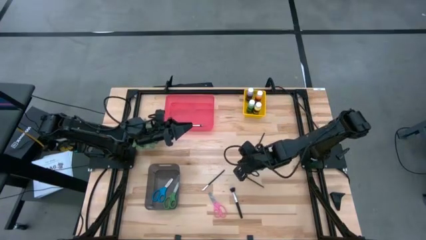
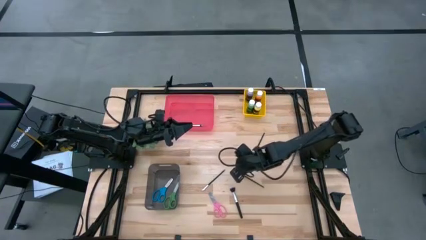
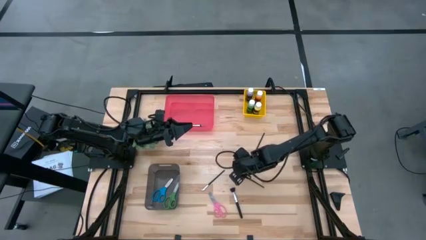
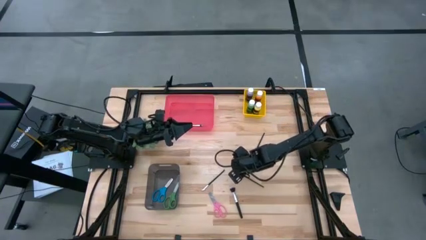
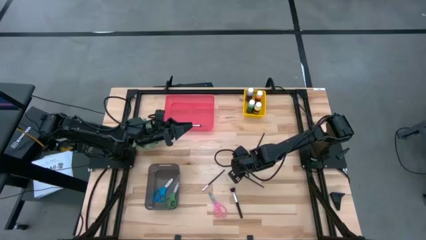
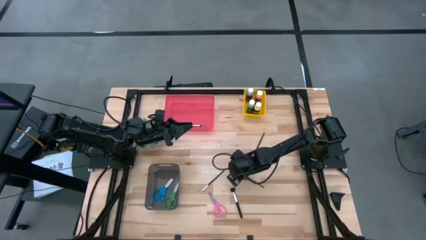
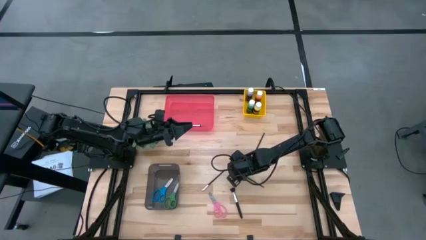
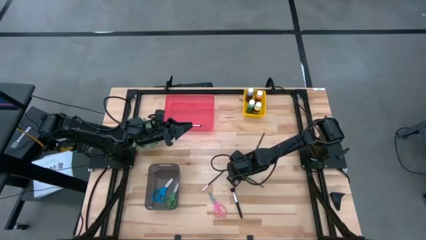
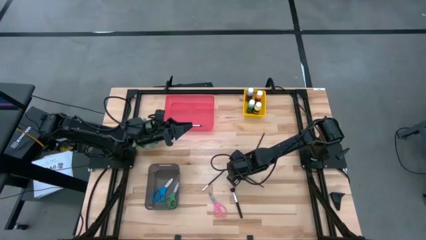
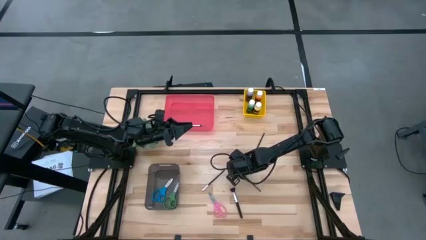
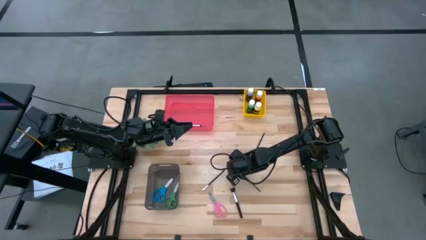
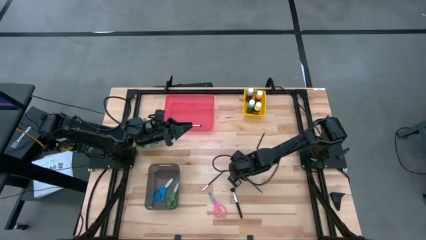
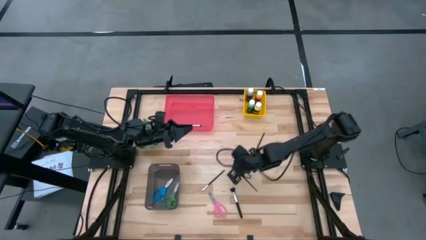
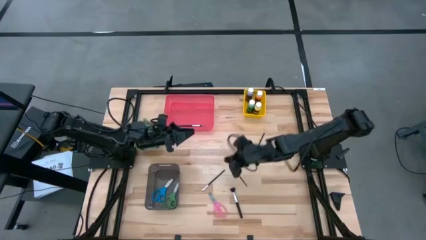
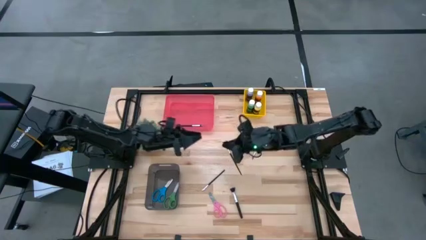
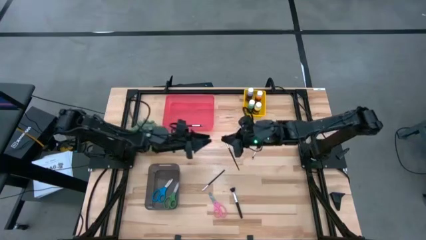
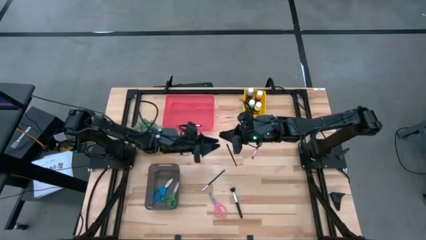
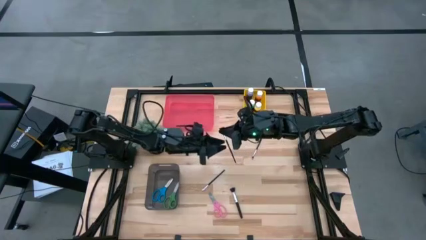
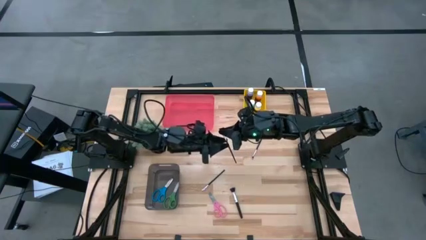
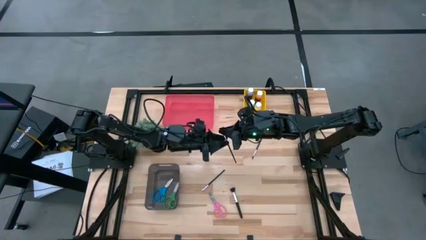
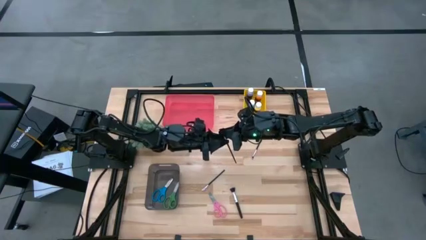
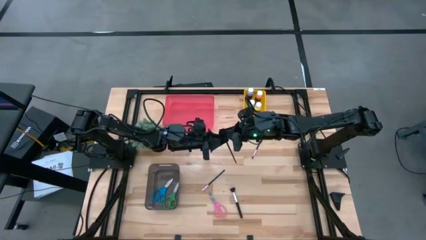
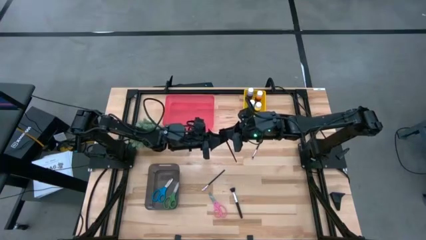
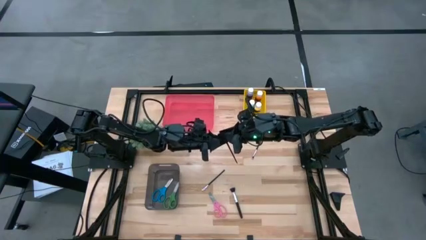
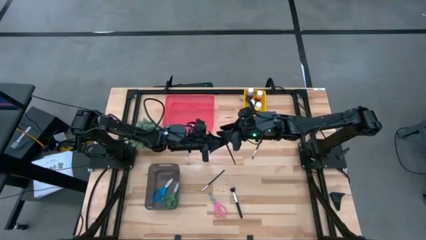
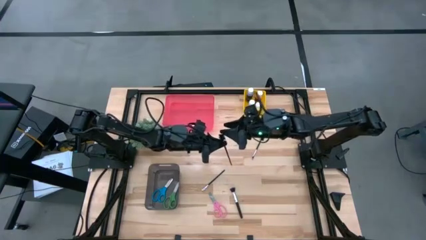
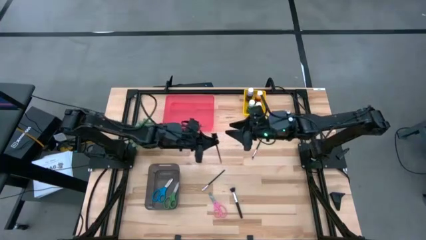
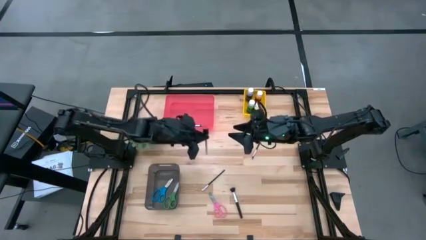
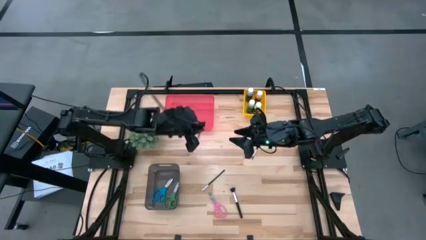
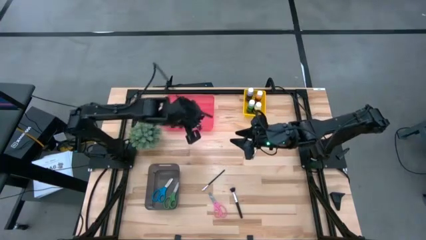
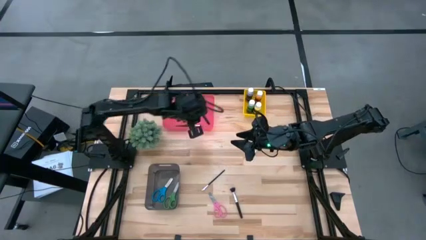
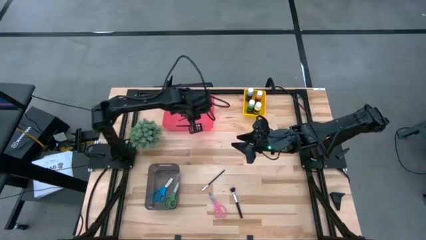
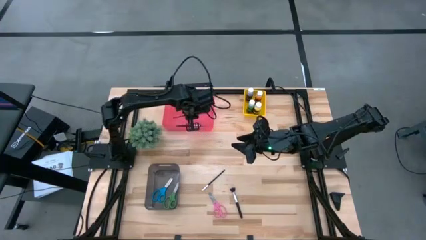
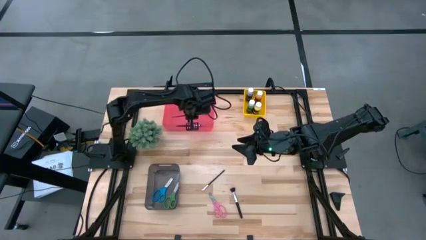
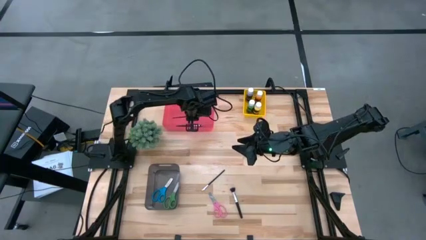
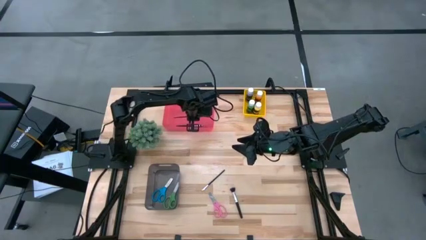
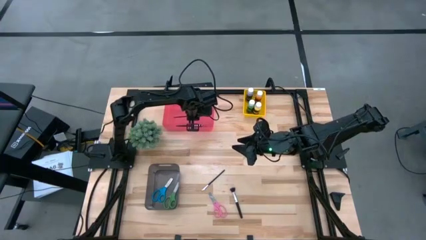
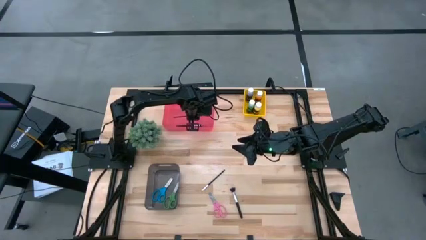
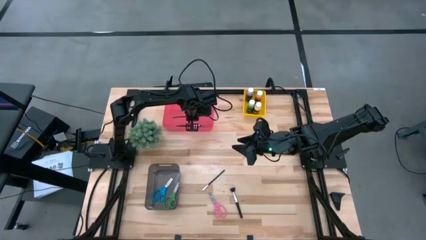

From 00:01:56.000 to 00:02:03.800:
Task: Pick & Place Paint Supplies
Put the brow brush into the red bin

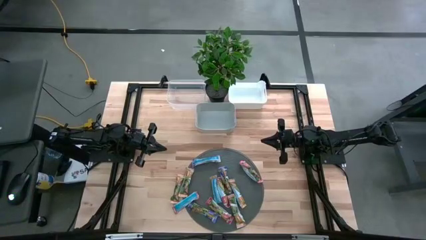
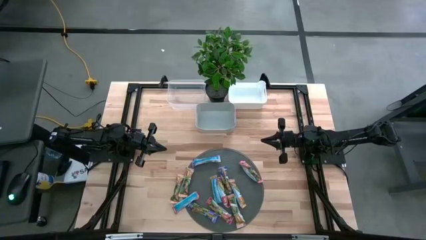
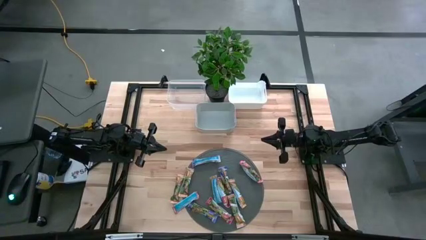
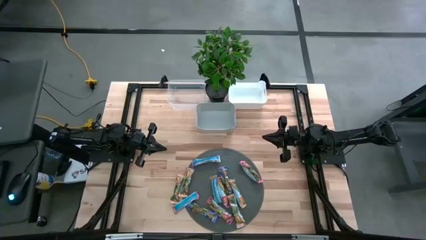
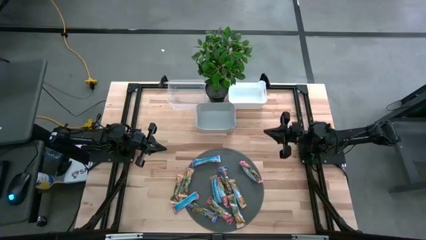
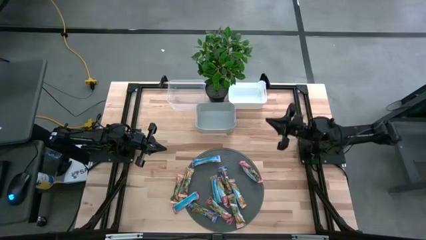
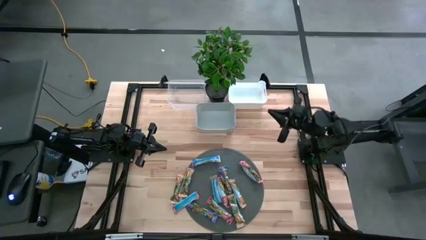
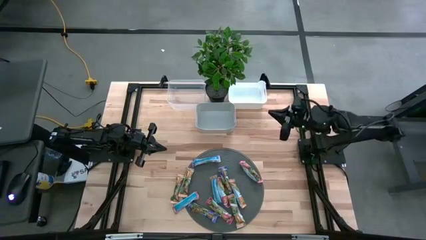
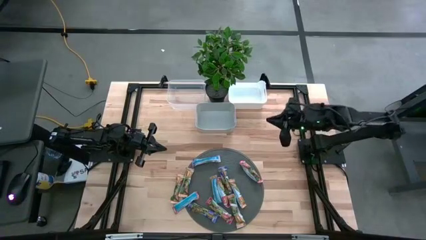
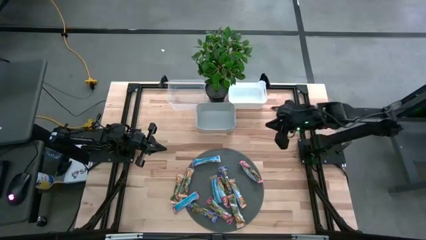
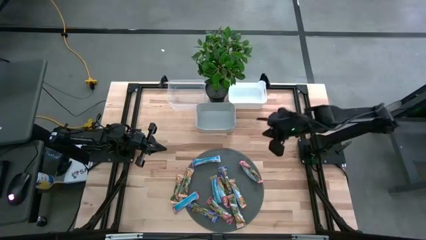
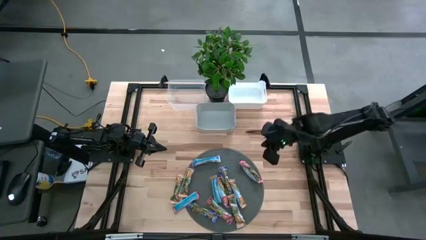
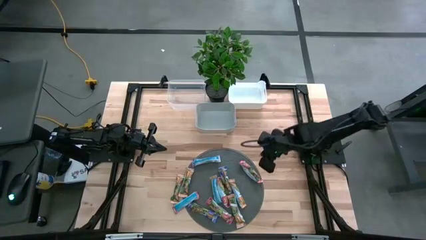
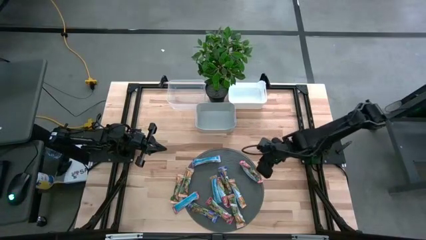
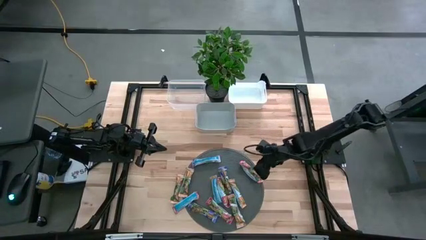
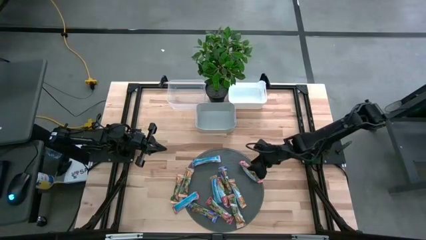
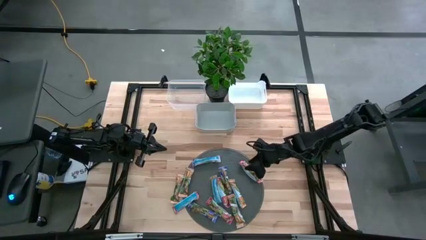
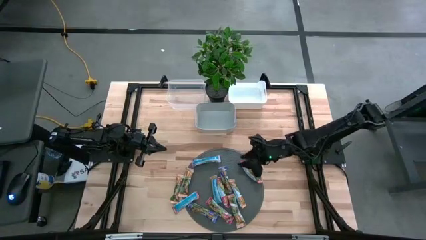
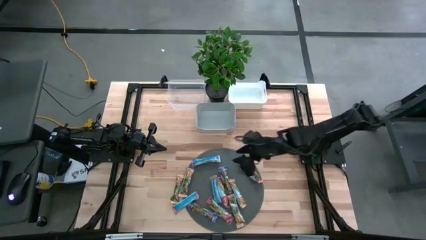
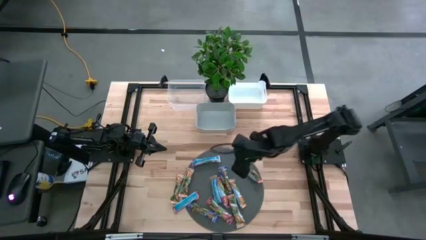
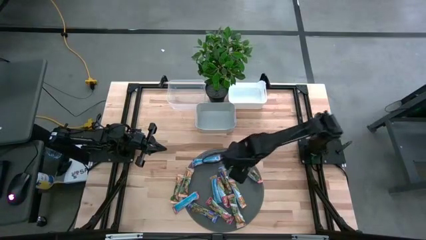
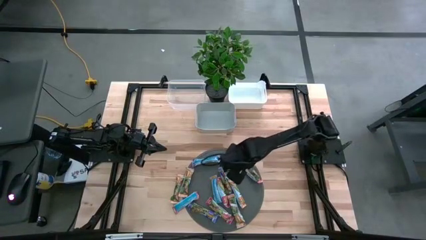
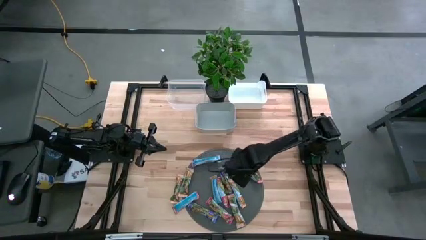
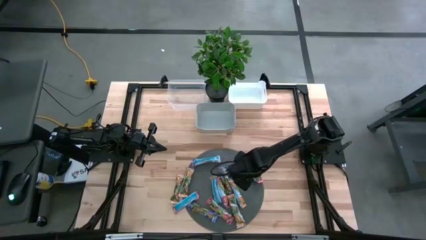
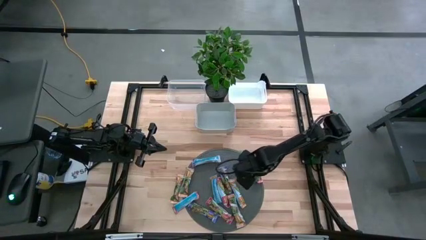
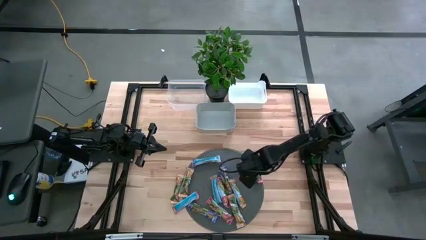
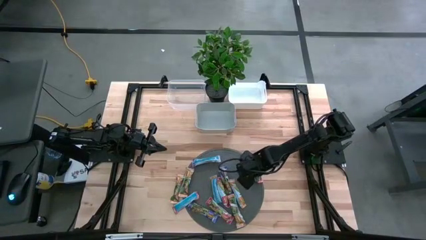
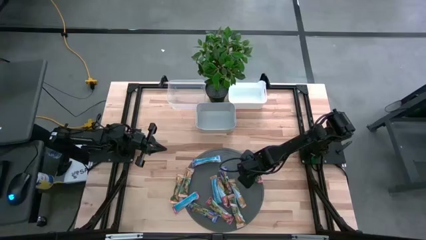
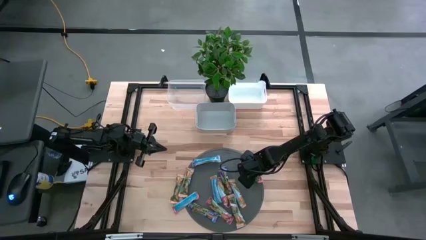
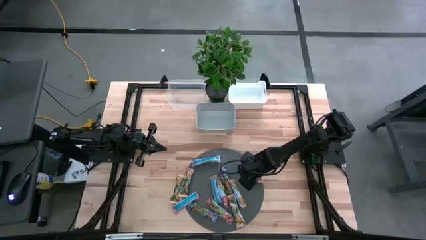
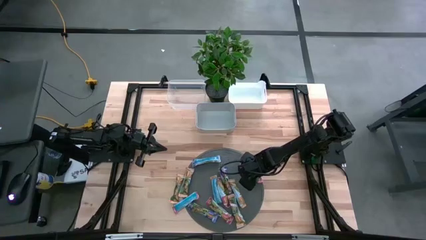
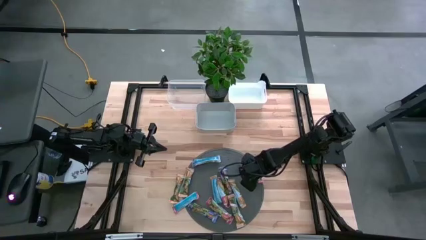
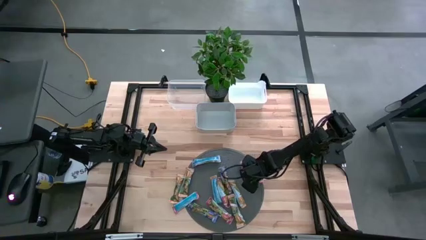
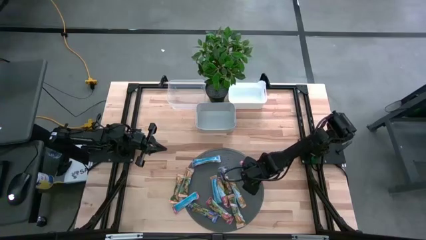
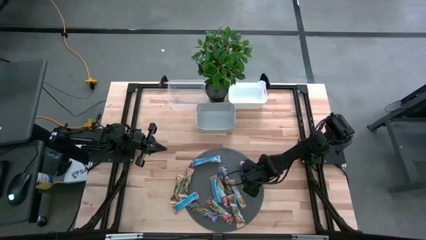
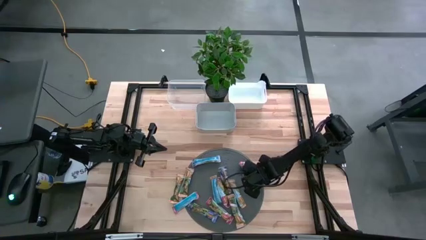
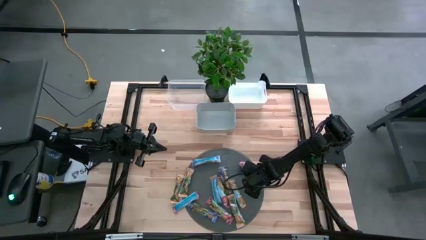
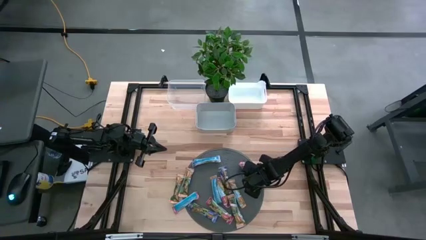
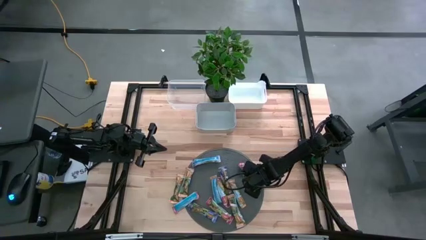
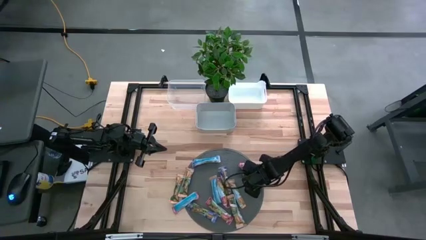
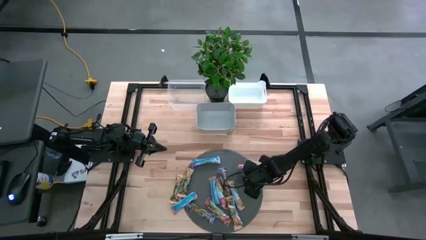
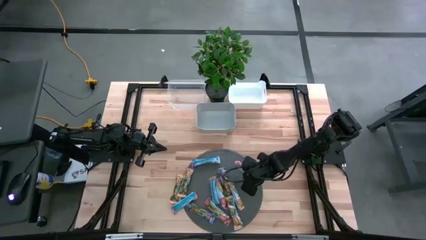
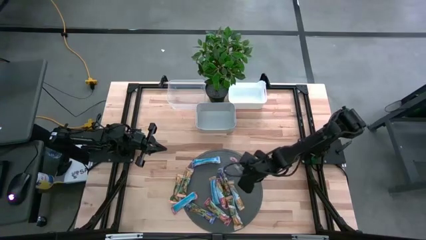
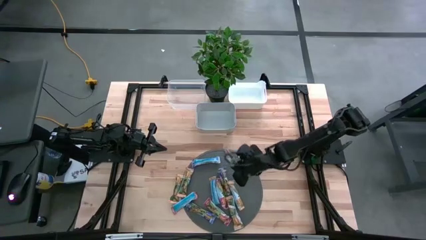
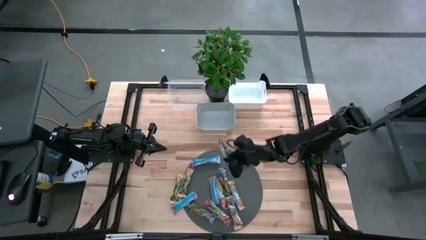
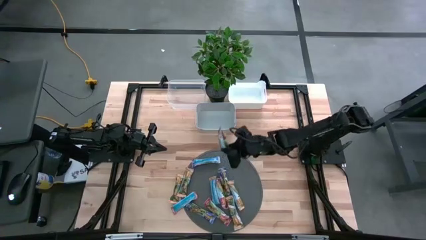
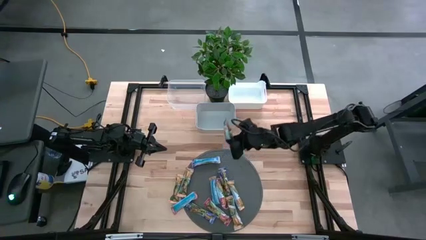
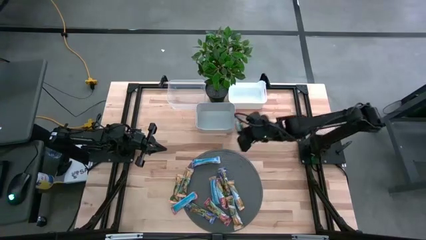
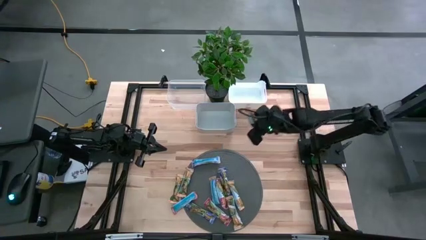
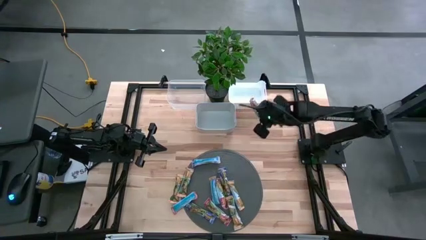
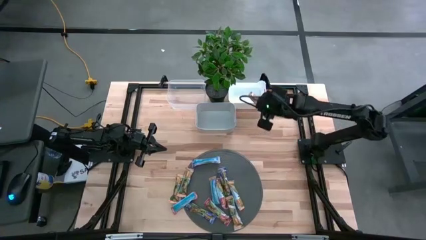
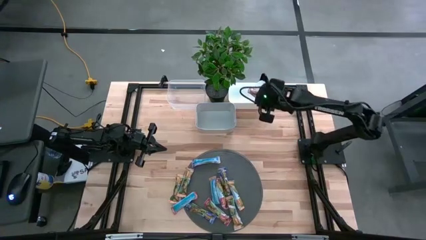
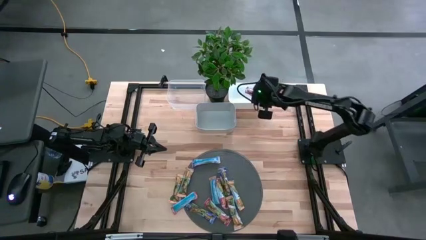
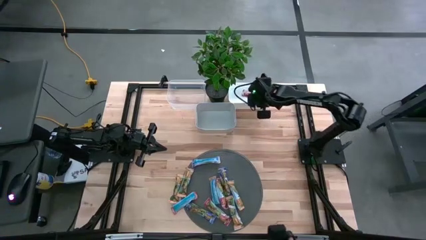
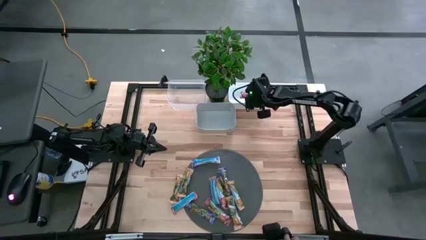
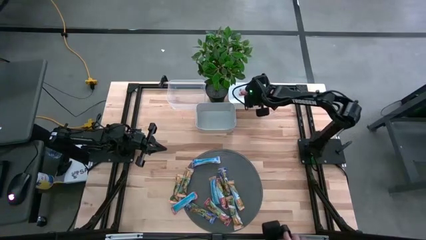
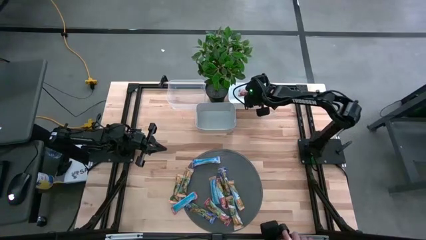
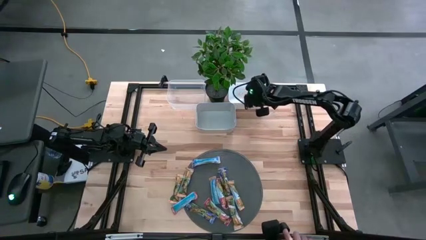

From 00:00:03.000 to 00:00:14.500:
Task: Pick and place Granola Bars by type
Put the red granola bar into the white bin
